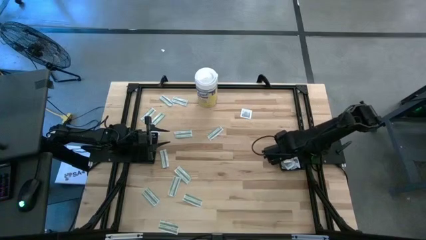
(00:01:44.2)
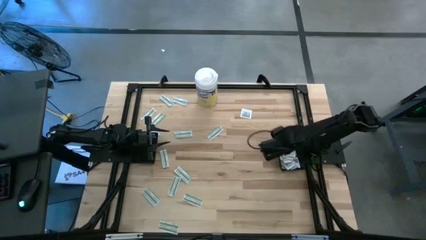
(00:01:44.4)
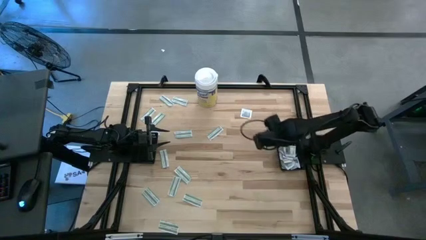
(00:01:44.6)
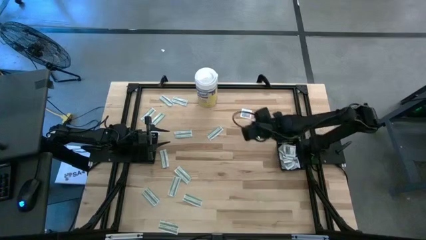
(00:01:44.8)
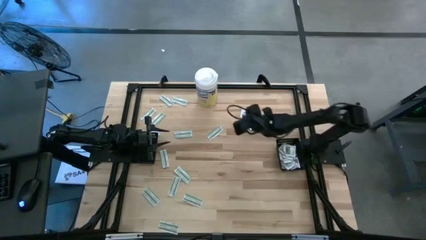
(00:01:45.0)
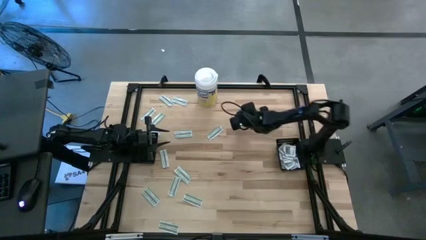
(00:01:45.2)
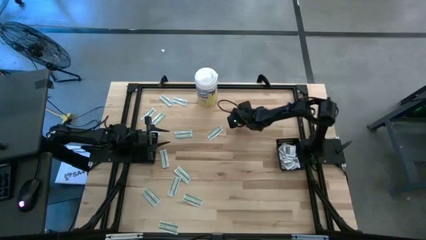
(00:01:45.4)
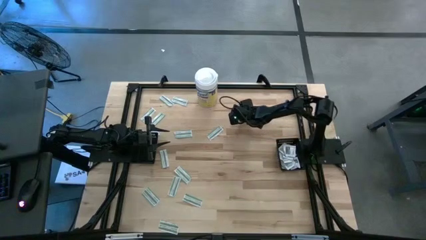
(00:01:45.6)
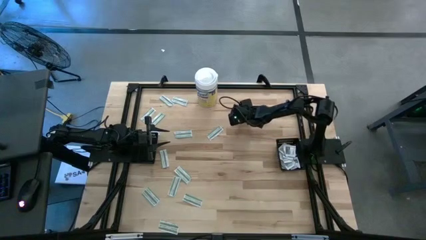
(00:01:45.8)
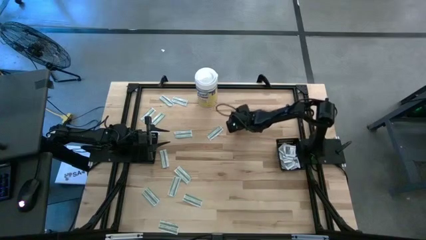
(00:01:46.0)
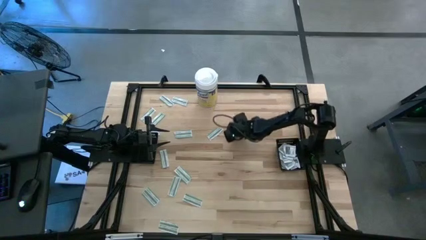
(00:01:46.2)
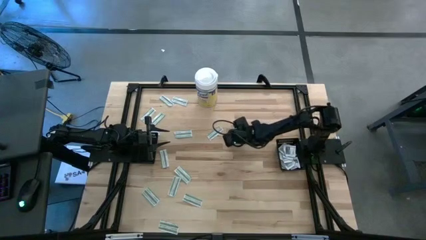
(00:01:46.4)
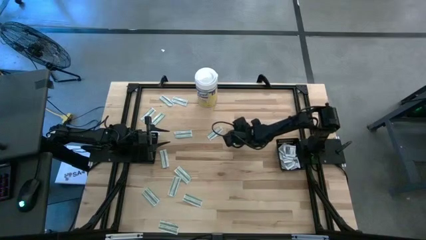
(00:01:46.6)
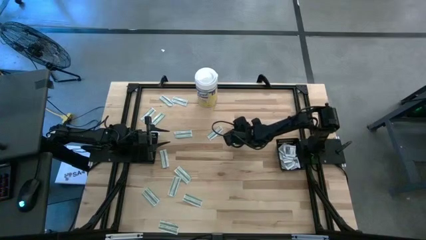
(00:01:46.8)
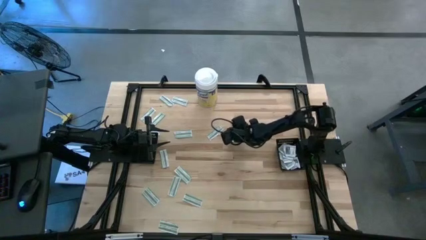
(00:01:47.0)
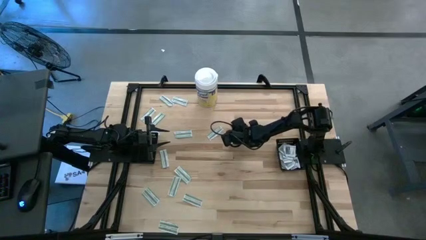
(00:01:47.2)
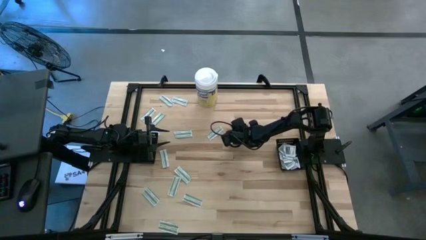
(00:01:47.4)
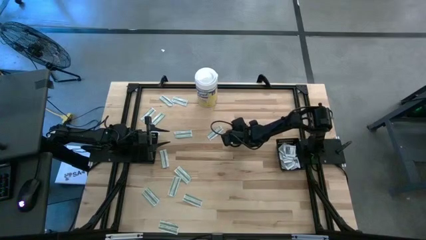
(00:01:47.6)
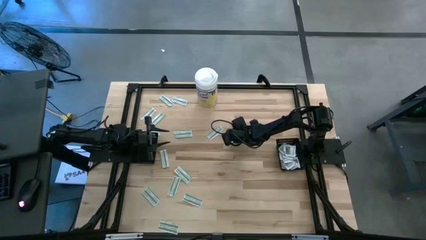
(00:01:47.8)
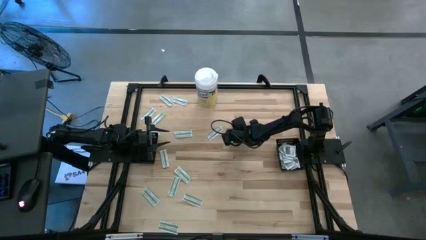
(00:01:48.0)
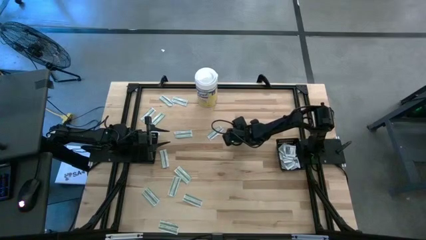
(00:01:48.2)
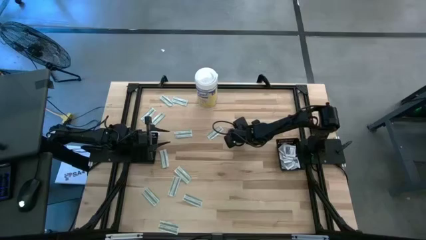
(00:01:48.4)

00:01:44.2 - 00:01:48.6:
Task: Pick & Place First Aid Supplies
Put the towelette pack into the right black basket

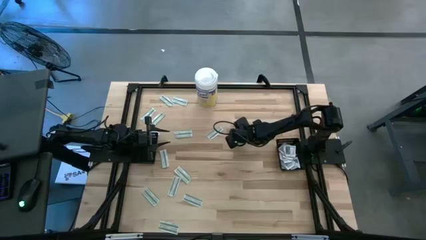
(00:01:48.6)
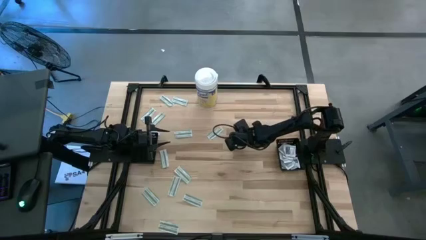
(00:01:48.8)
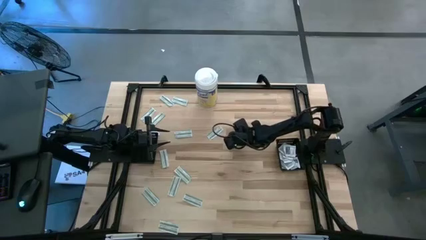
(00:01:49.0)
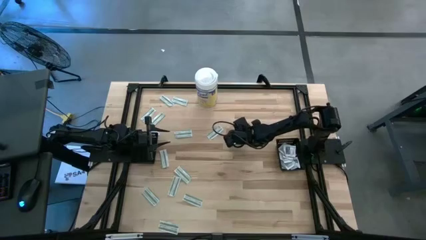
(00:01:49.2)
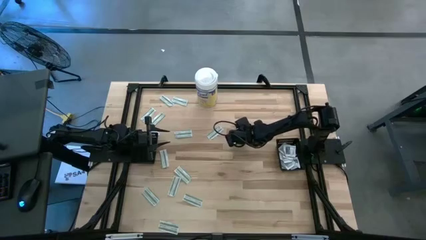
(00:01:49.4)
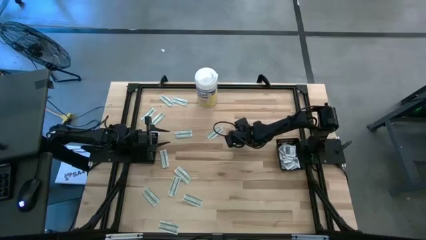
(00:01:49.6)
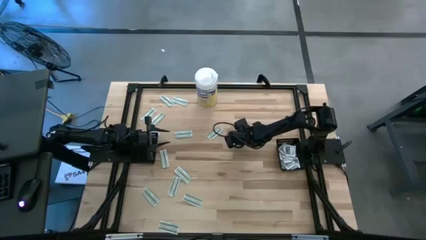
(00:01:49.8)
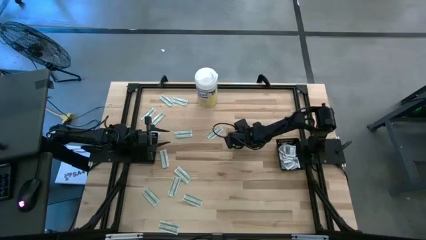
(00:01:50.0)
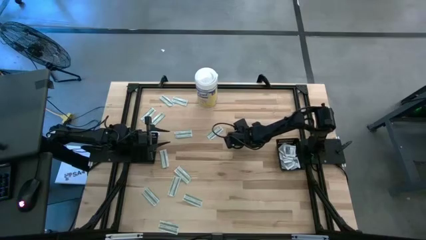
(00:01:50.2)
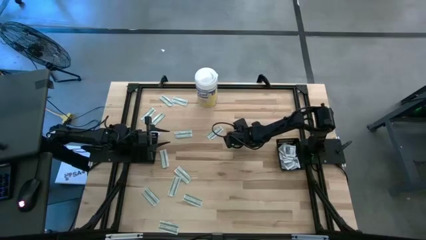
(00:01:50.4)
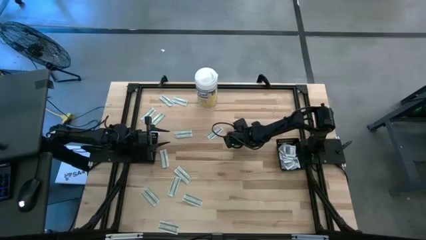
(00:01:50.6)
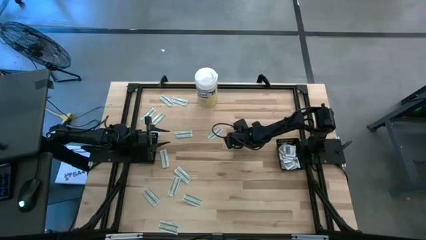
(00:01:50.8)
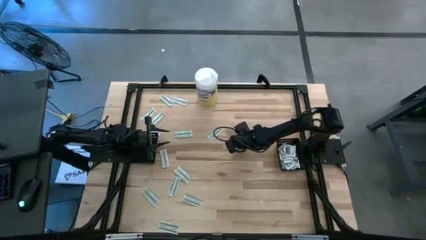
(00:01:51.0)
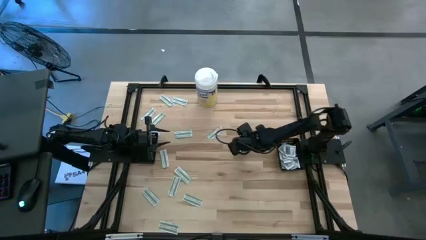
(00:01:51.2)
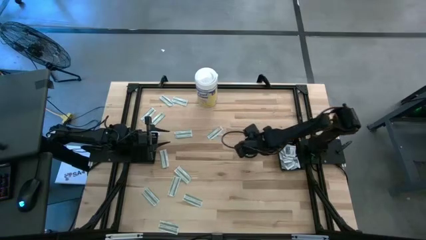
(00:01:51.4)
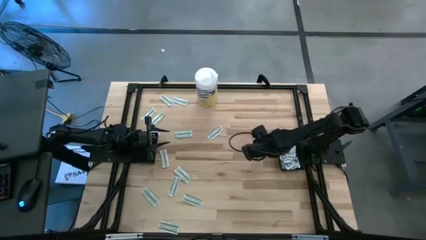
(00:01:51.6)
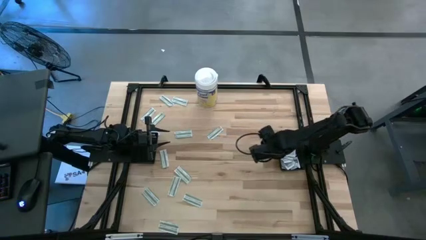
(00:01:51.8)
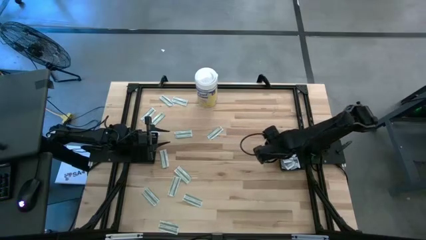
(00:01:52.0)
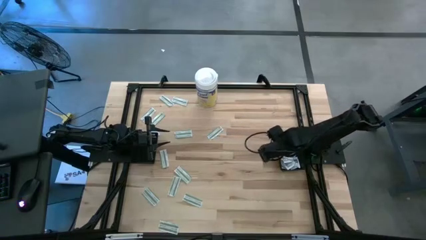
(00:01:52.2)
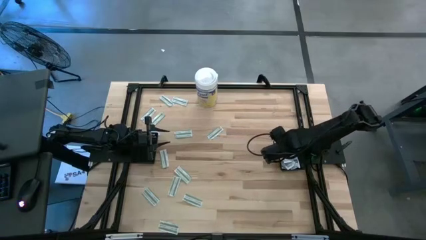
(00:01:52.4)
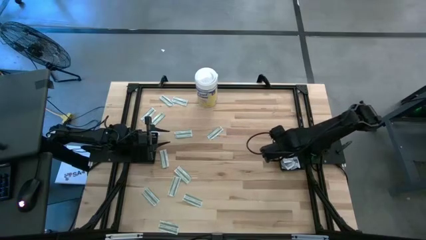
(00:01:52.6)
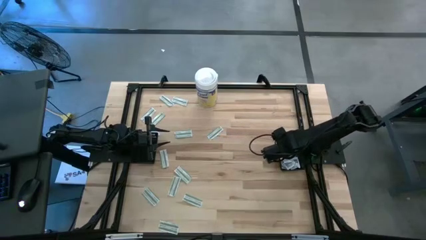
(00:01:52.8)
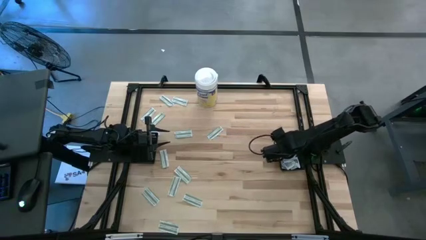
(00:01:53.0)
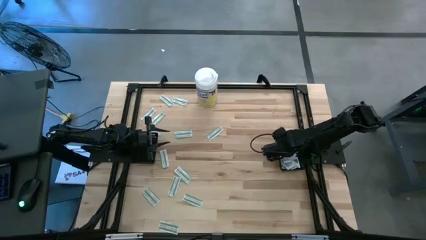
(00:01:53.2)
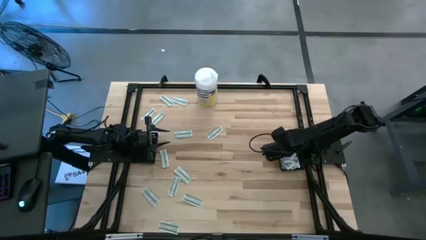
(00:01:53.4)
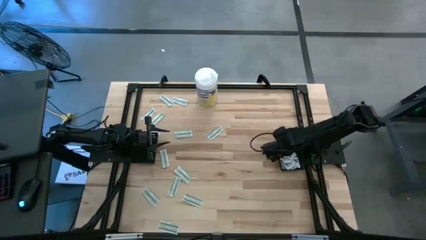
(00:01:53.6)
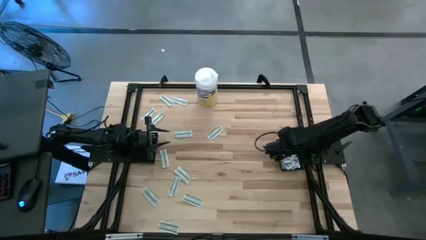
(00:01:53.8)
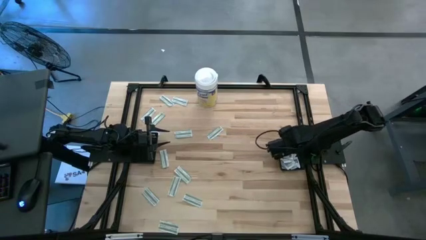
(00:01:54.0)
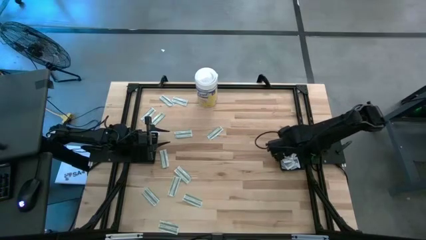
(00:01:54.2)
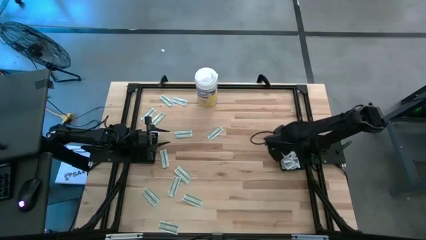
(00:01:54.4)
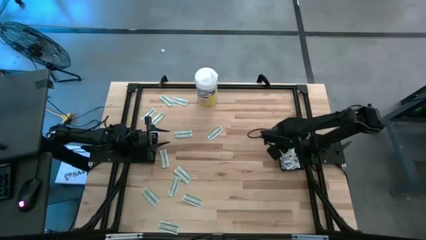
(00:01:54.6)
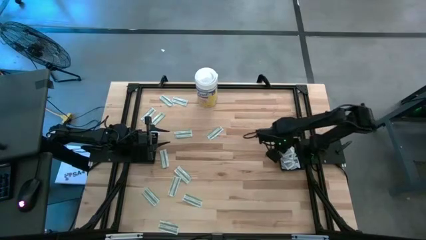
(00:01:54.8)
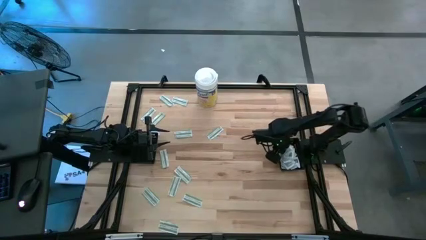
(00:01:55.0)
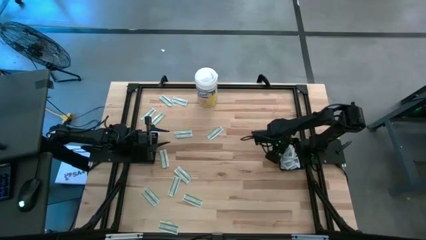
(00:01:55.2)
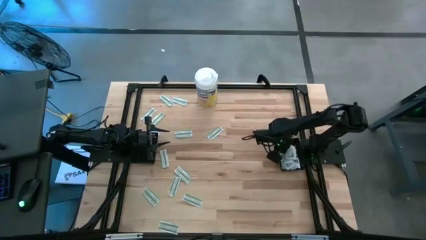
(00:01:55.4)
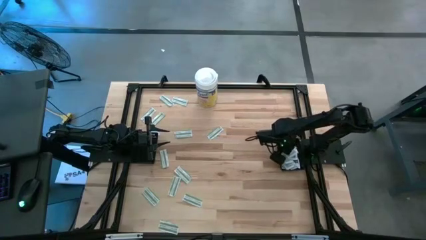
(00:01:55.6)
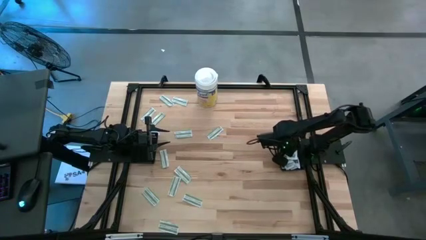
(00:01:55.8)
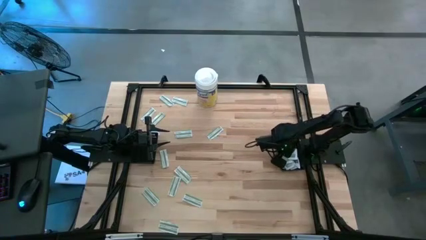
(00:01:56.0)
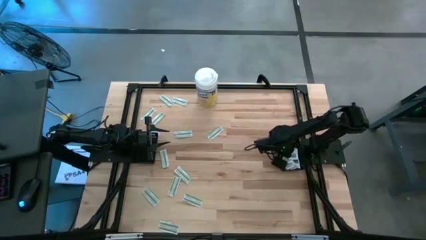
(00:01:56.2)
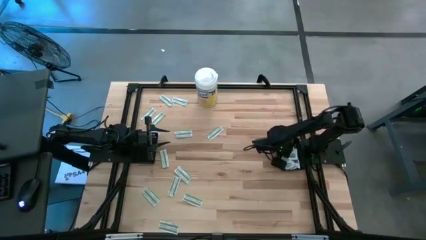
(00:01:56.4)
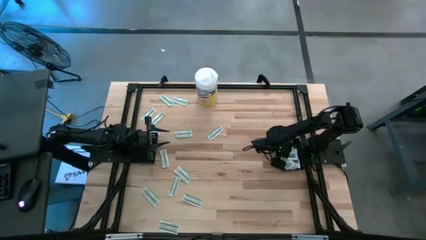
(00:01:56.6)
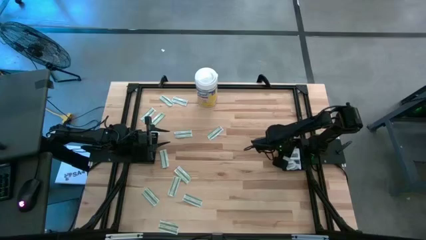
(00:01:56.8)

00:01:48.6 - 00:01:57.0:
Put the towelette pack into the right black basket

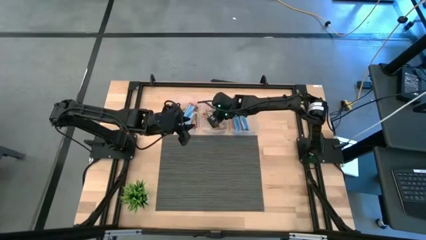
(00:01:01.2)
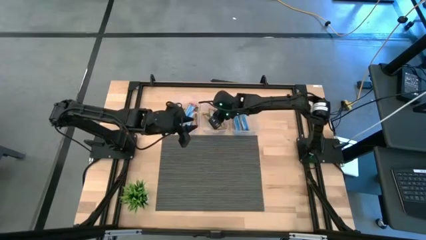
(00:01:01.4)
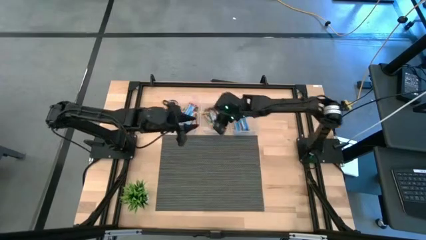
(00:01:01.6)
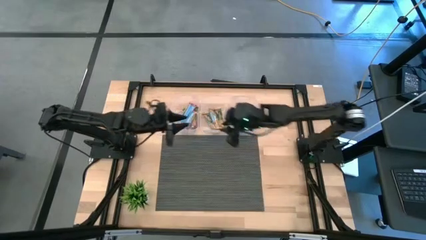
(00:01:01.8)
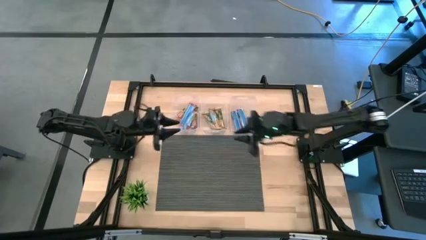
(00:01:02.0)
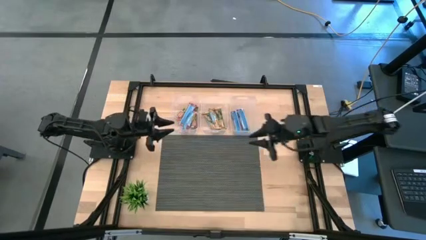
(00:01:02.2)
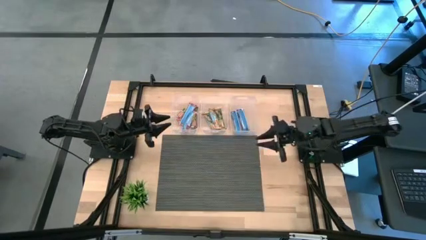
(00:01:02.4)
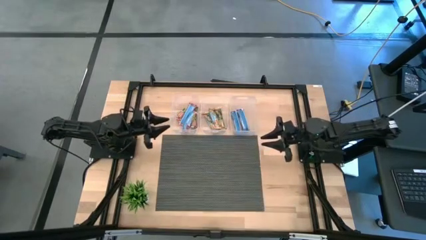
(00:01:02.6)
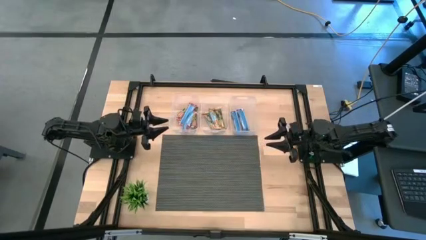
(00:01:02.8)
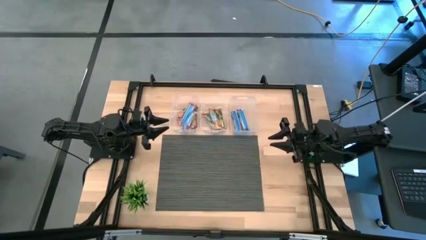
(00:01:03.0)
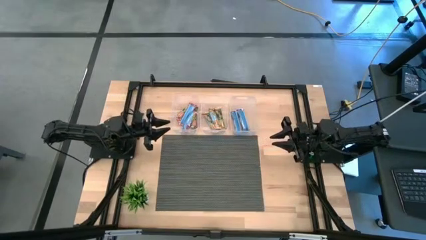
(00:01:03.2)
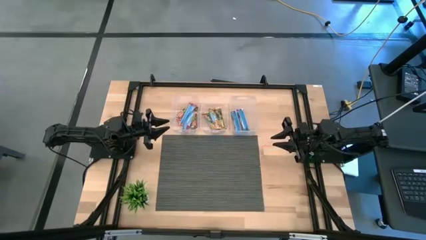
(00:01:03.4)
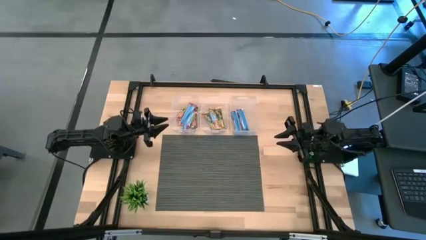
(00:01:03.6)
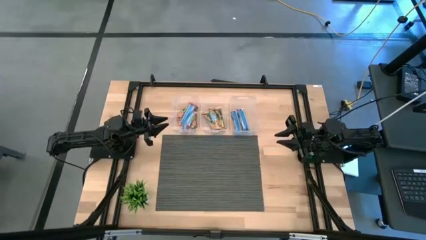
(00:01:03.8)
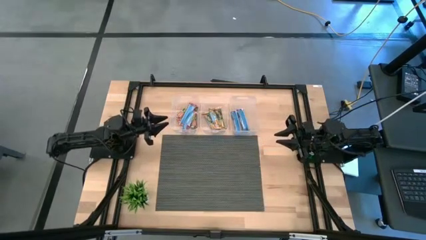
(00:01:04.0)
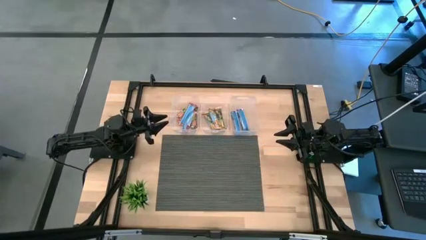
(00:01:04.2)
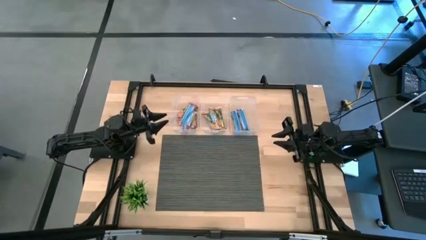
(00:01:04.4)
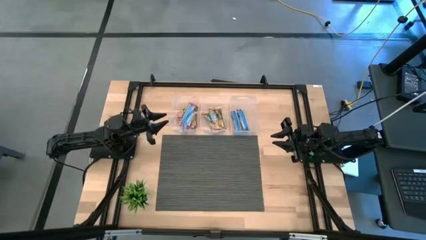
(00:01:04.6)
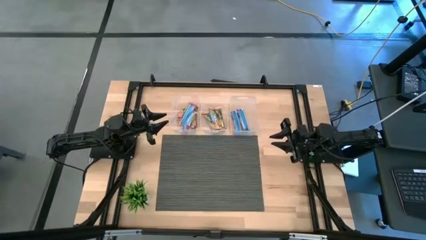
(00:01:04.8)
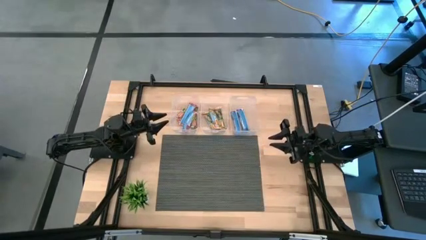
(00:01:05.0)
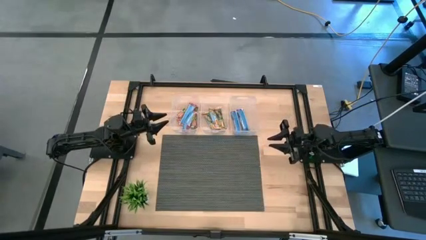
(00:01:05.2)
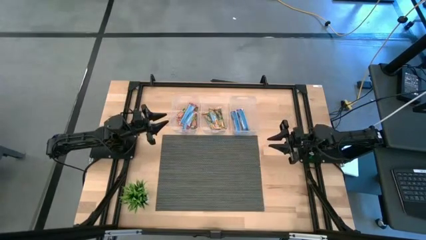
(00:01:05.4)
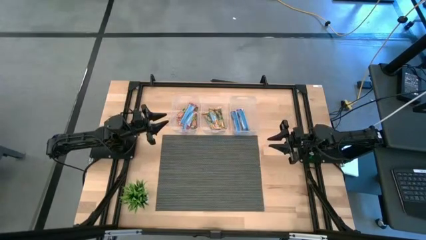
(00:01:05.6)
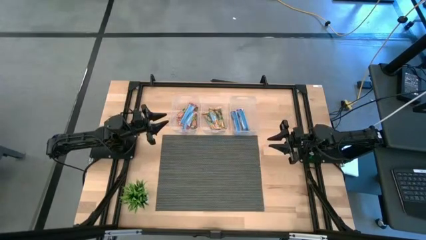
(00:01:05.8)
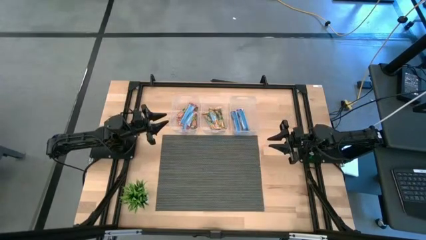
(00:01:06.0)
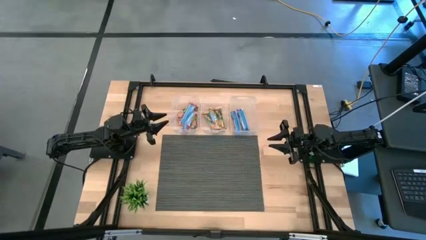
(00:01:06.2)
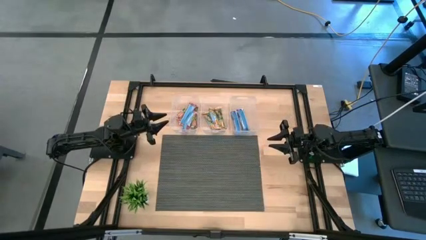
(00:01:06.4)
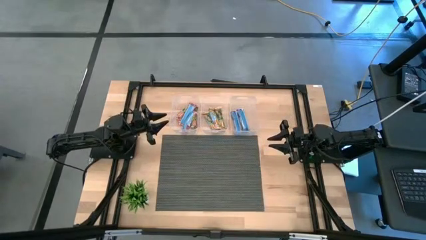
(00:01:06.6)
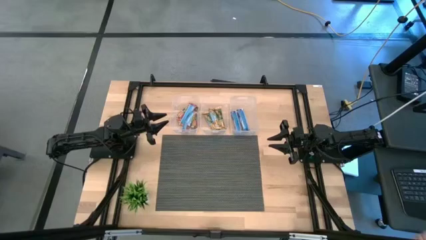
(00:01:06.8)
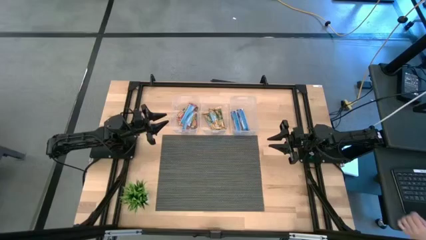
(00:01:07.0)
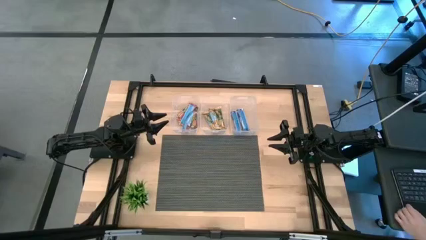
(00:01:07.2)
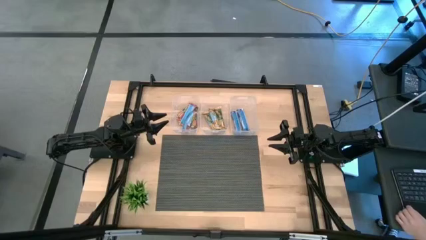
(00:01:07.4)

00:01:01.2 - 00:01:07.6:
Task: Pick and place Granola Bars by type
Return to Home Position
